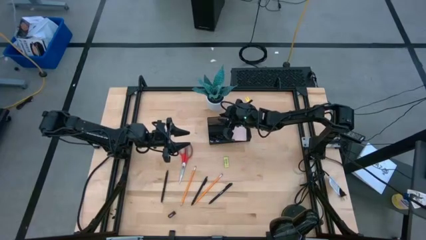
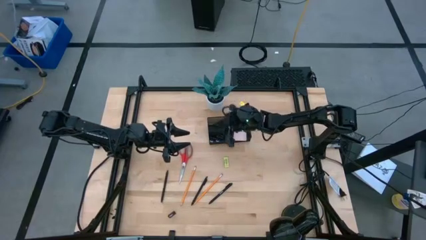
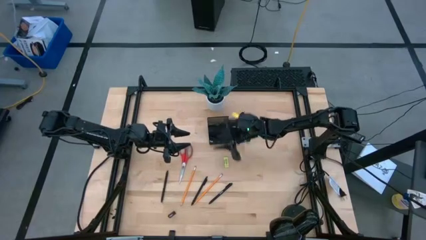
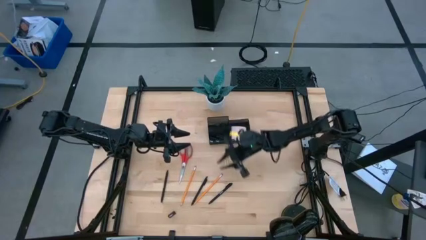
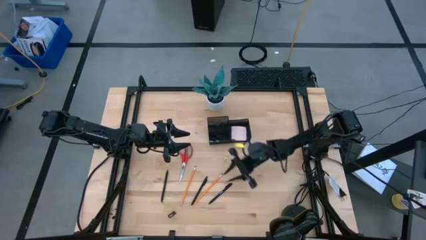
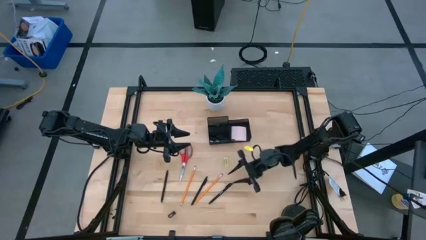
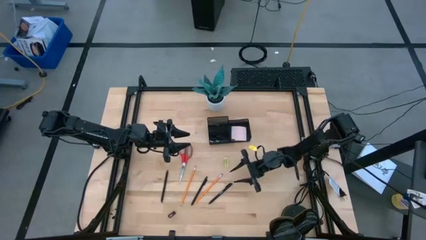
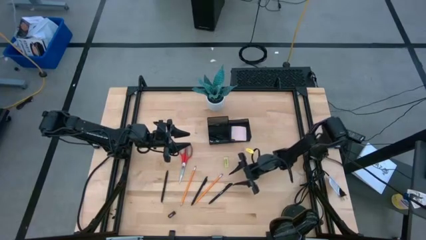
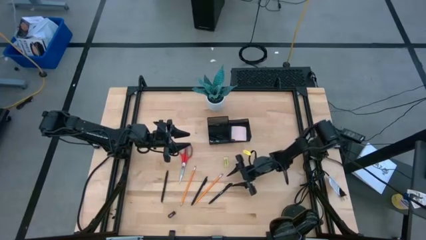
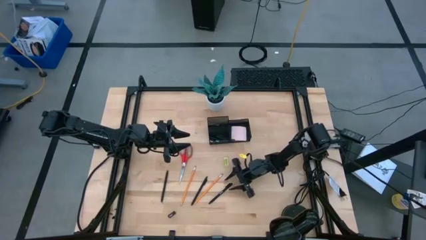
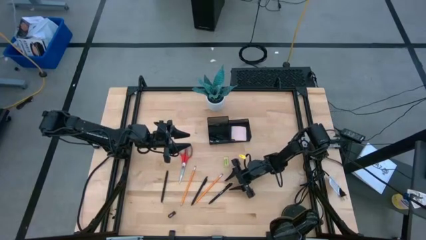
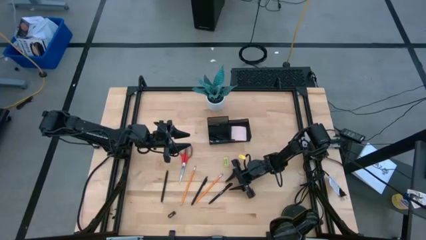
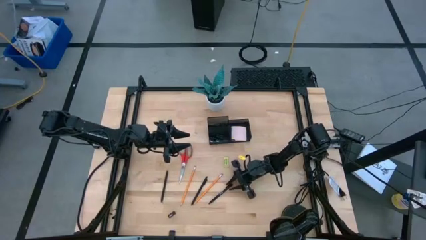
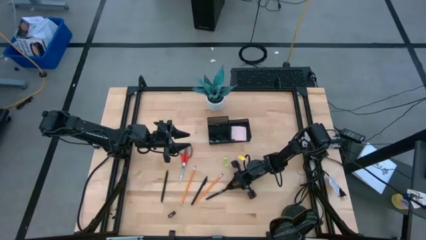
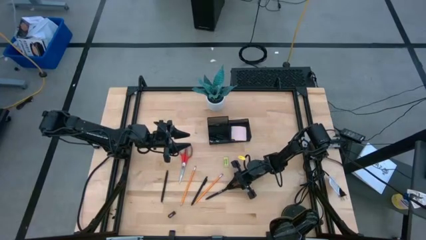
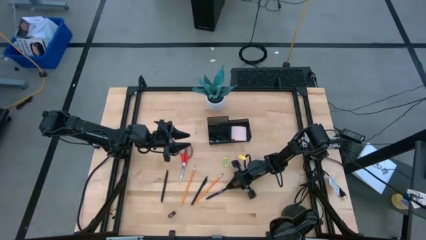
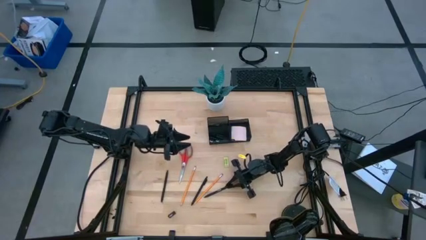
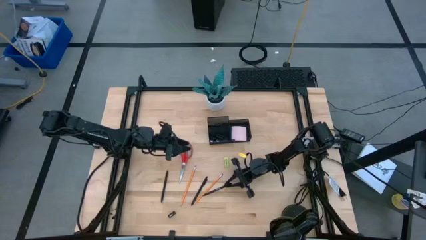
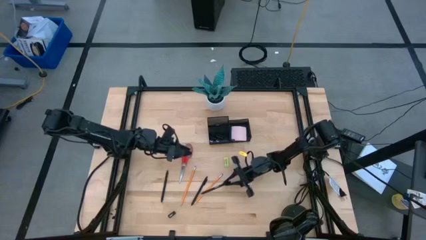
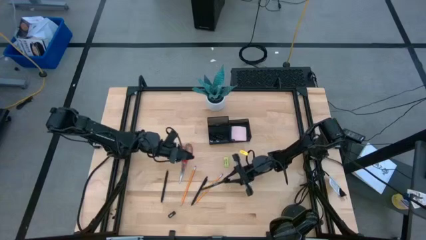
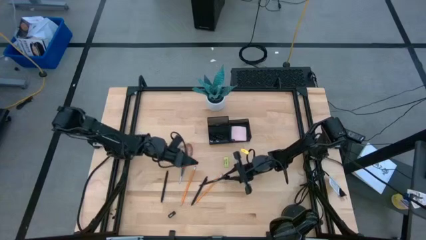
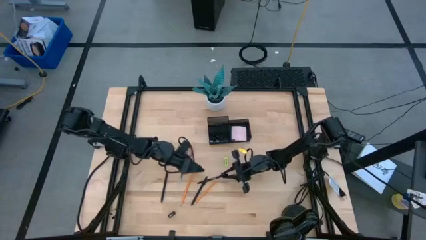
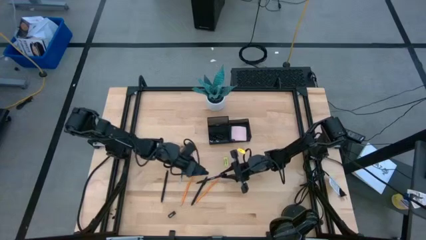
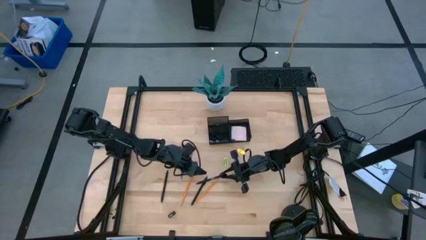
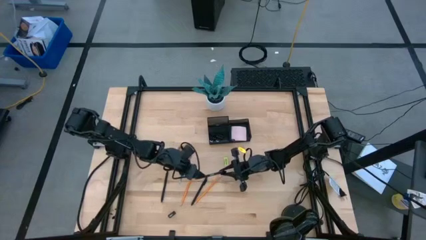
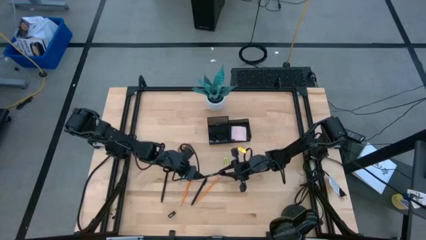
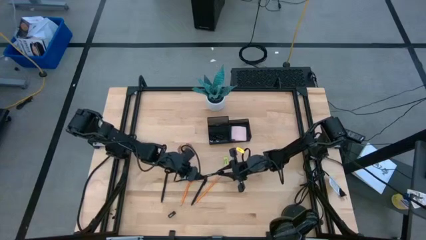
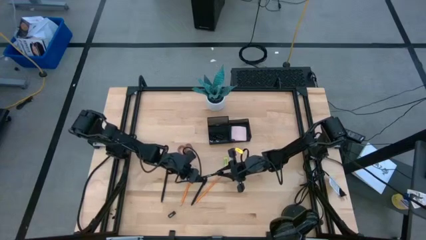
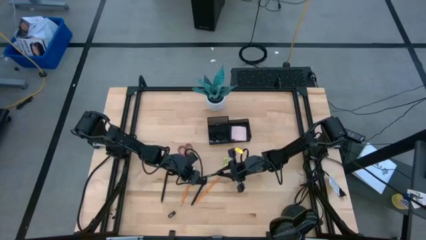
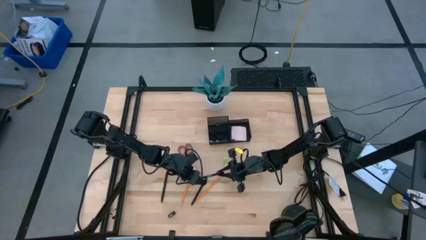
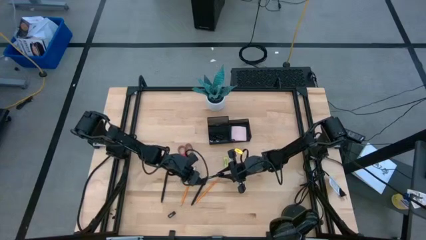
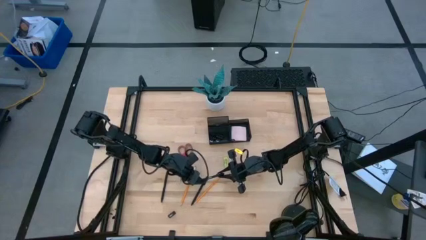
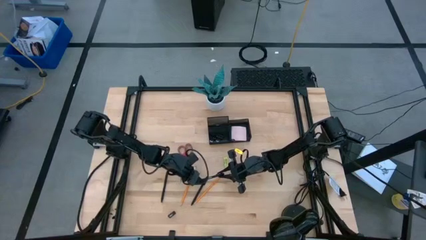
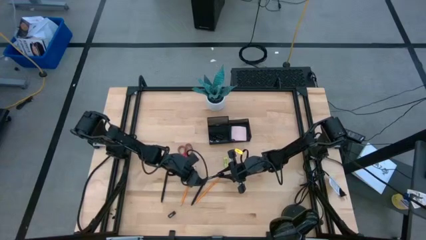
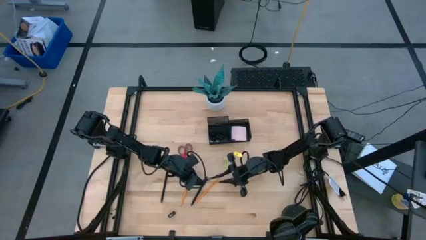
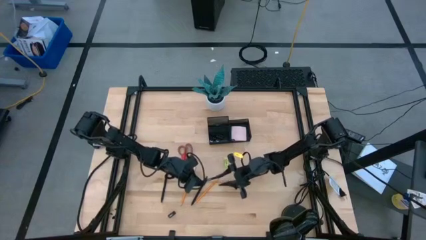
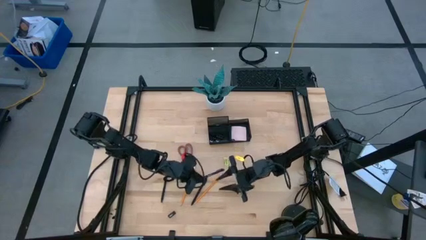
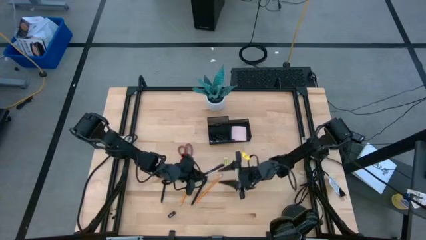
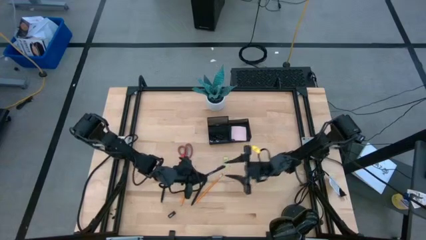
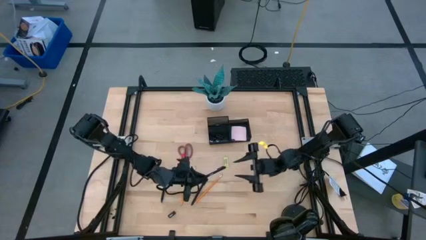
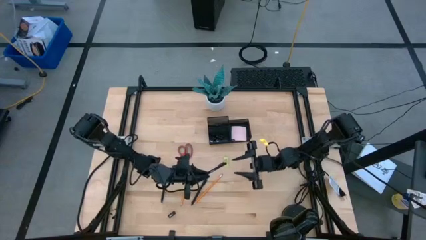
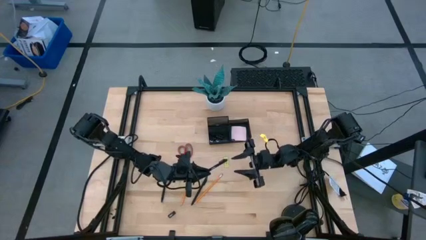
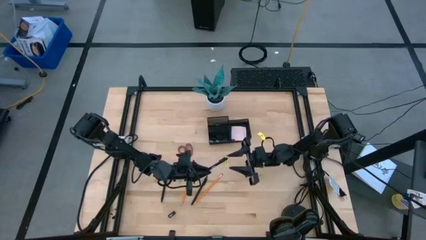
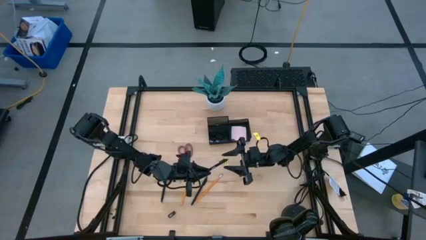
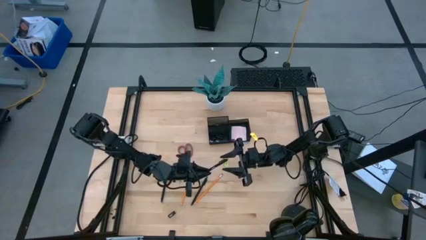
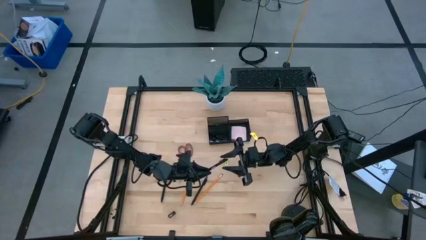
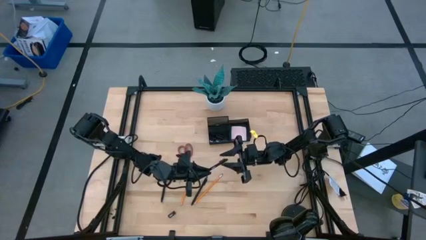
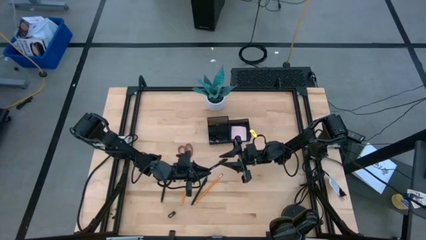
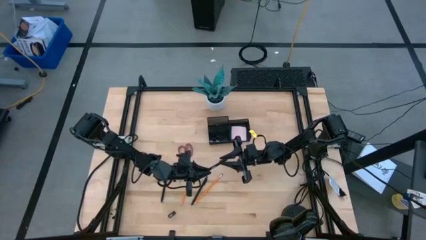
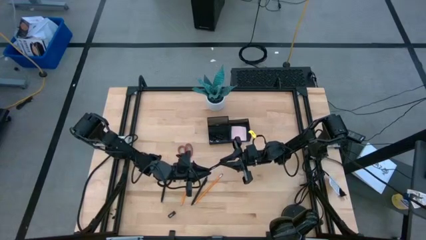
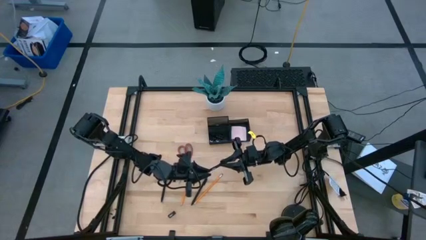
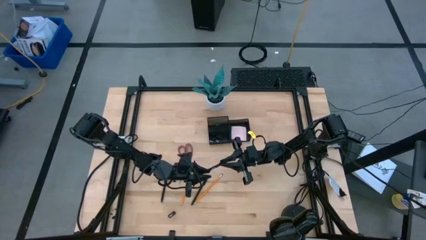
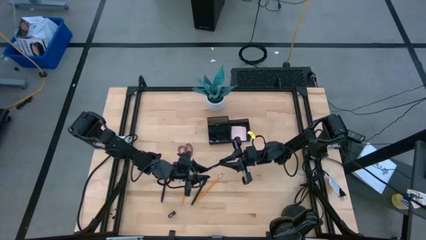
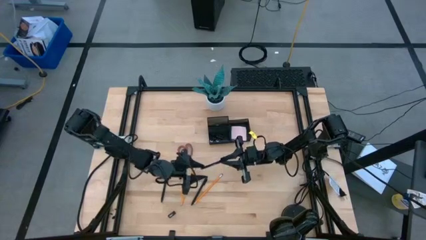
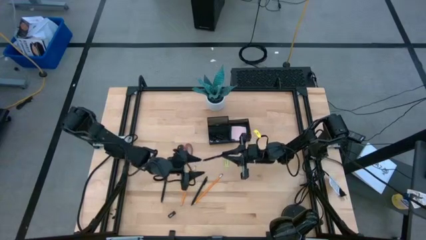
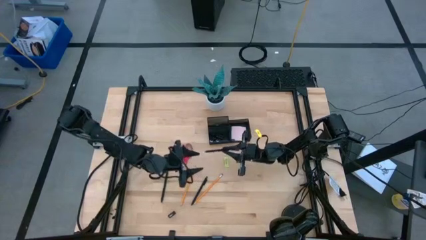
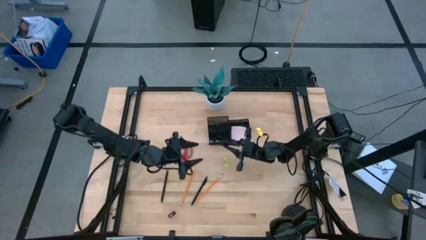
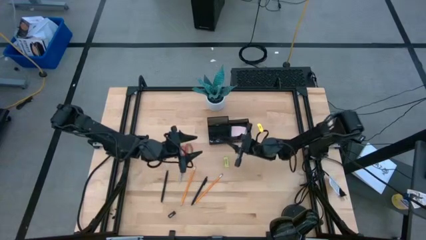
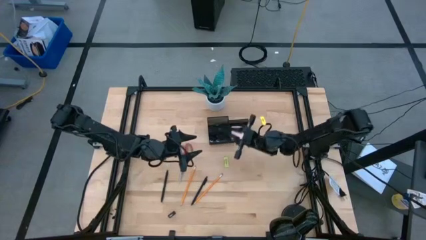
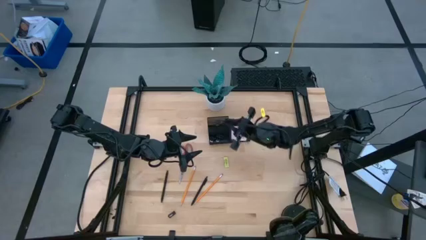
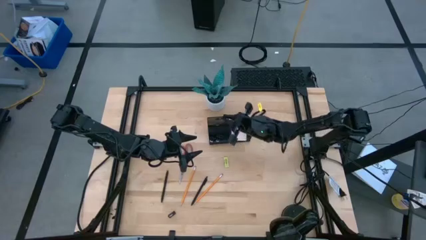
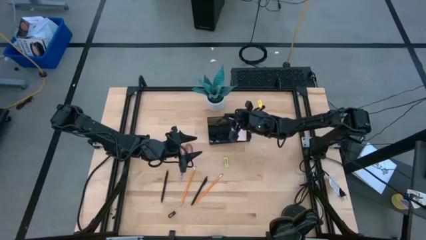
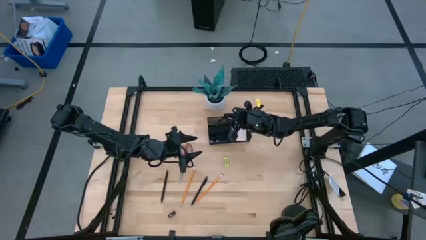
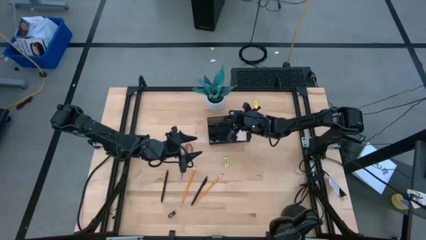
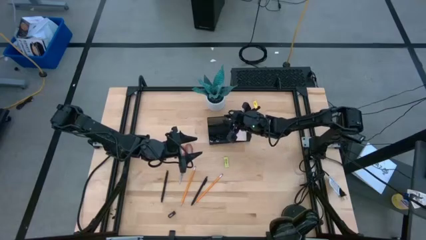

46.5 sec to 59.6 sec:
Task: Pick and place office supplies into organizer
Put the black pen into the black desk organizer
